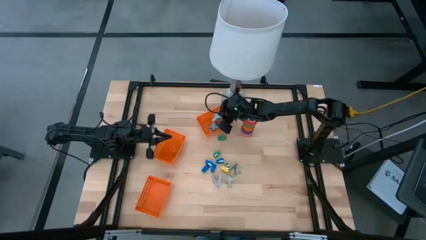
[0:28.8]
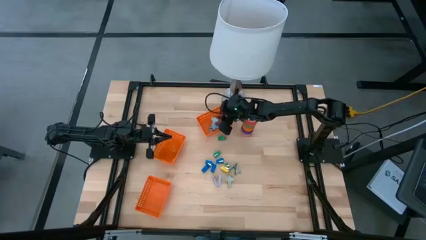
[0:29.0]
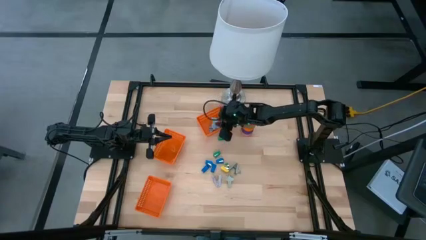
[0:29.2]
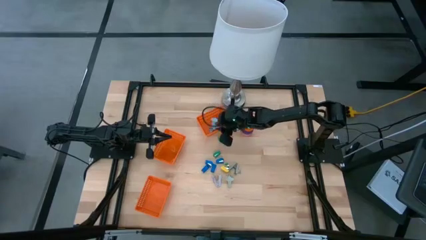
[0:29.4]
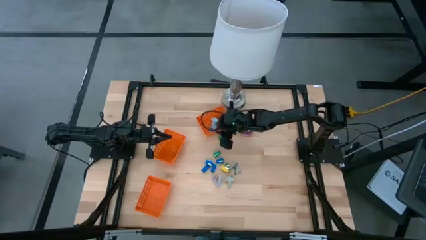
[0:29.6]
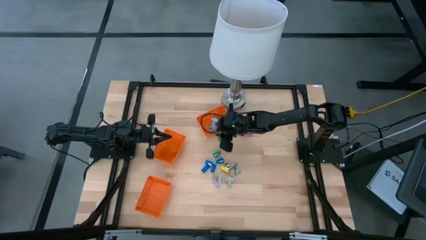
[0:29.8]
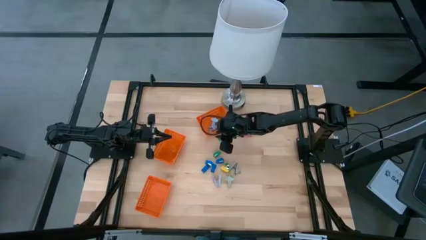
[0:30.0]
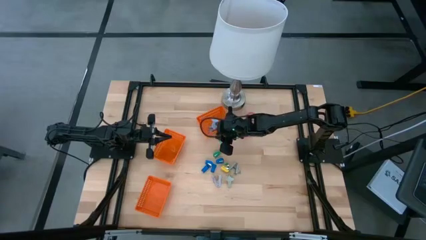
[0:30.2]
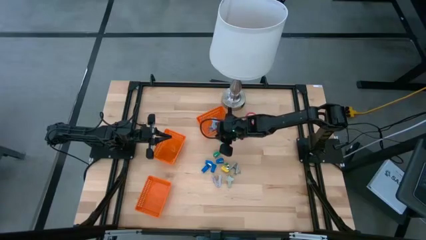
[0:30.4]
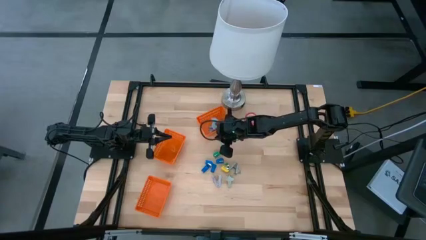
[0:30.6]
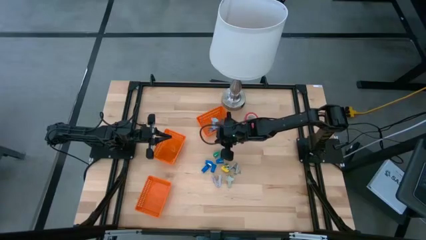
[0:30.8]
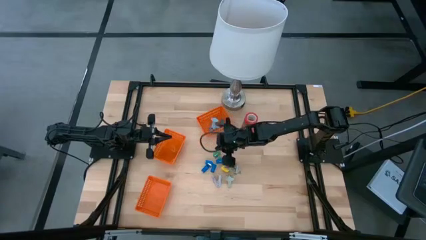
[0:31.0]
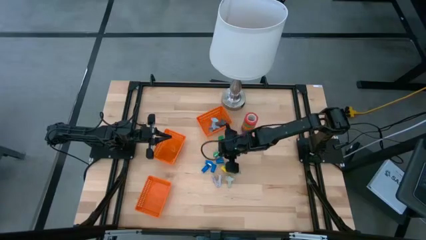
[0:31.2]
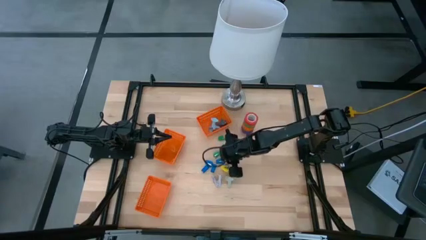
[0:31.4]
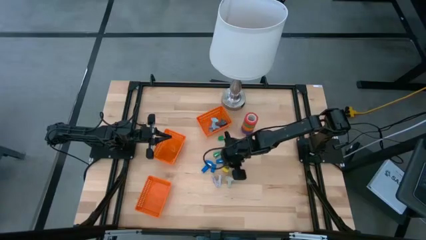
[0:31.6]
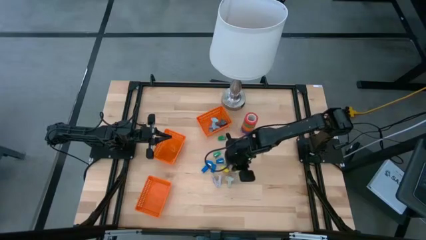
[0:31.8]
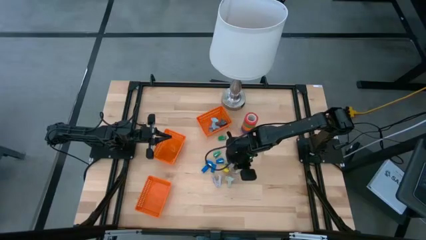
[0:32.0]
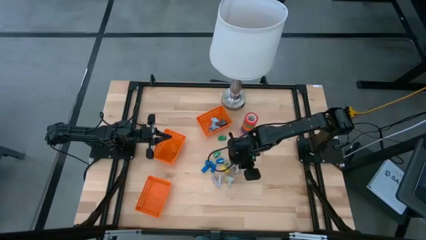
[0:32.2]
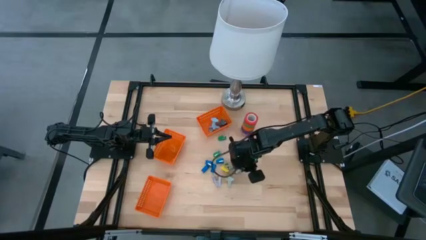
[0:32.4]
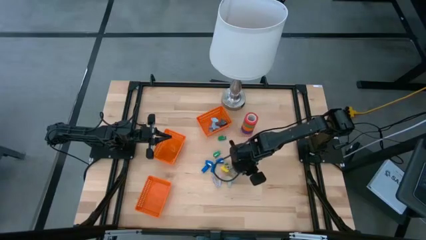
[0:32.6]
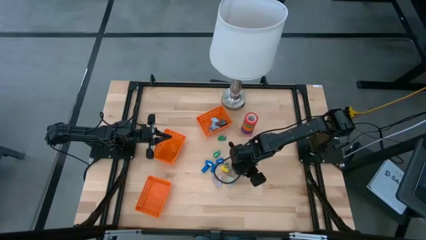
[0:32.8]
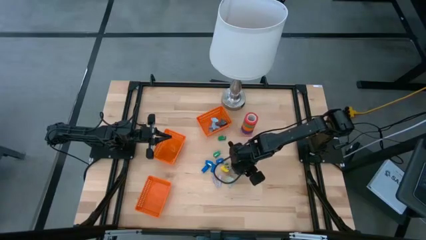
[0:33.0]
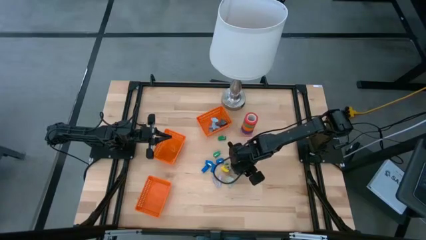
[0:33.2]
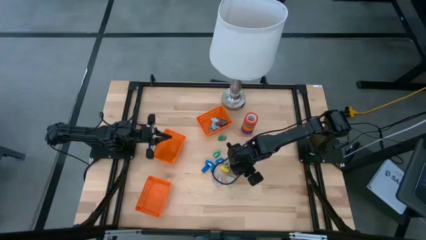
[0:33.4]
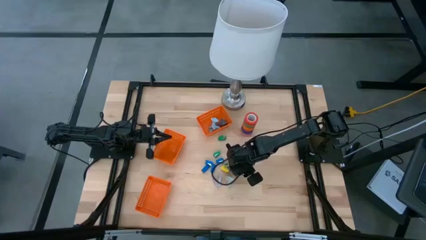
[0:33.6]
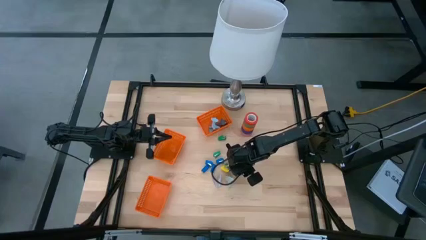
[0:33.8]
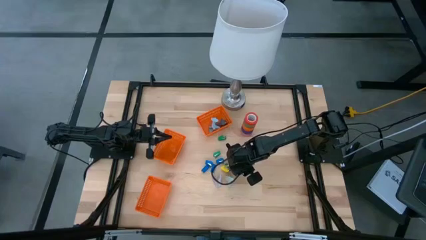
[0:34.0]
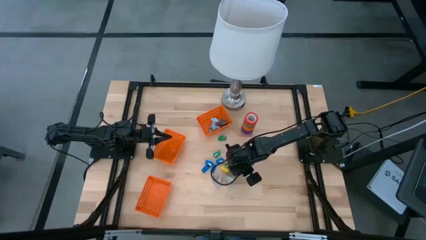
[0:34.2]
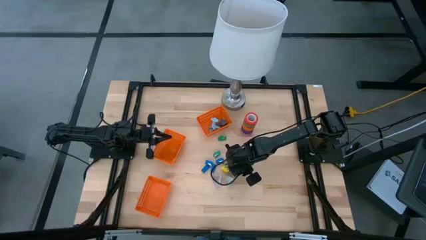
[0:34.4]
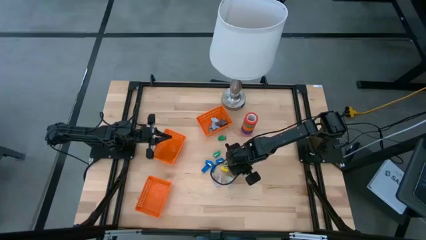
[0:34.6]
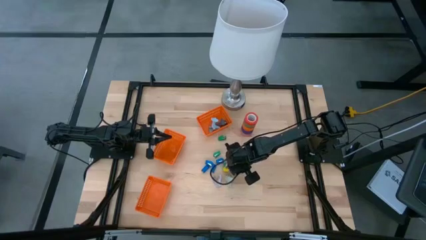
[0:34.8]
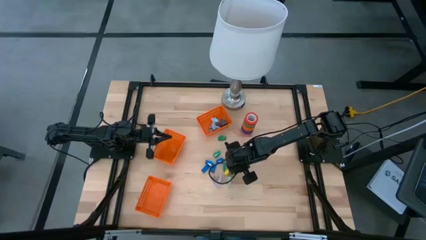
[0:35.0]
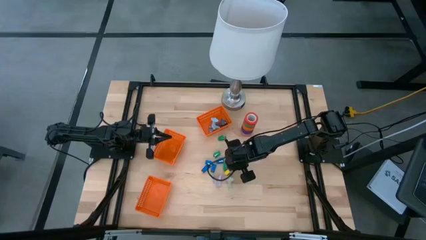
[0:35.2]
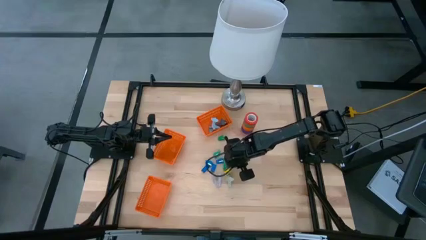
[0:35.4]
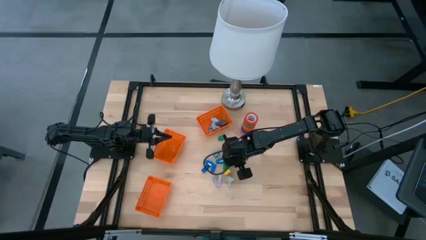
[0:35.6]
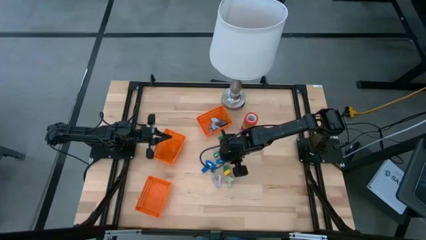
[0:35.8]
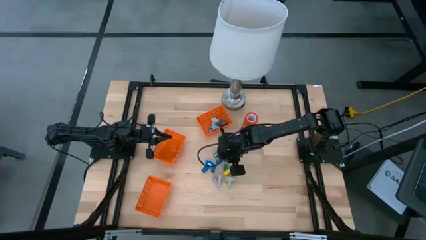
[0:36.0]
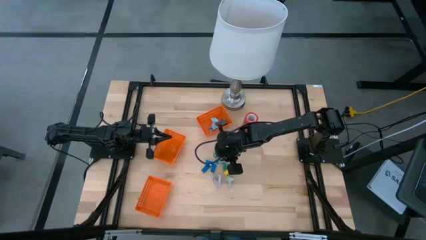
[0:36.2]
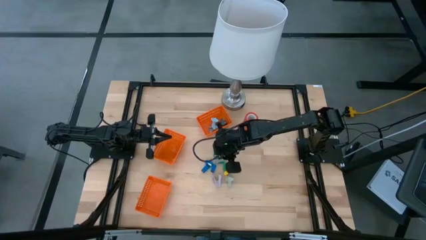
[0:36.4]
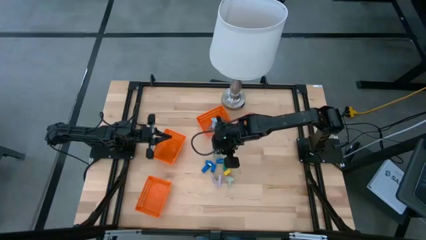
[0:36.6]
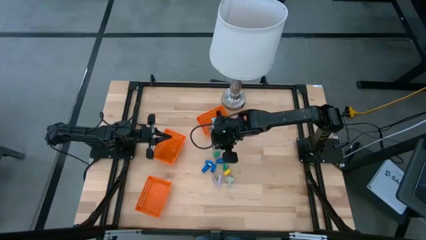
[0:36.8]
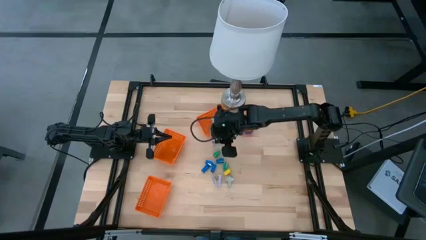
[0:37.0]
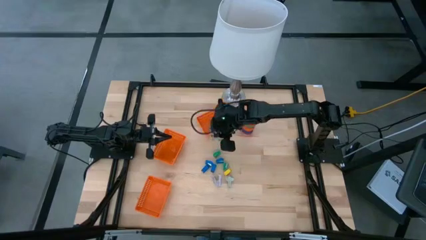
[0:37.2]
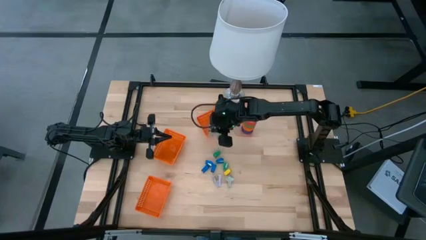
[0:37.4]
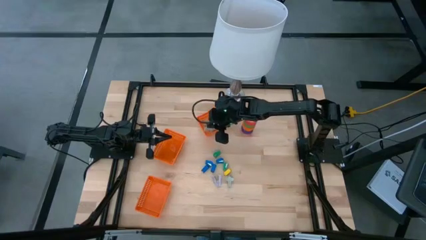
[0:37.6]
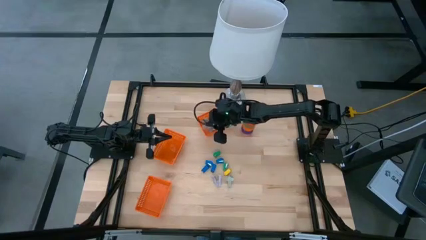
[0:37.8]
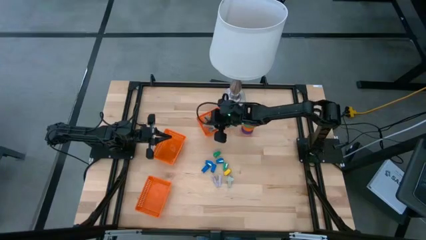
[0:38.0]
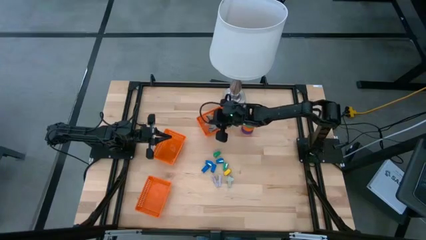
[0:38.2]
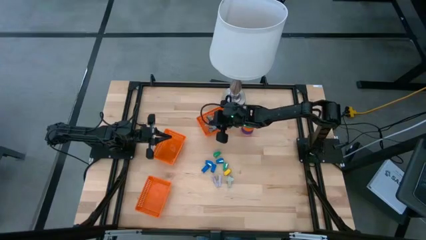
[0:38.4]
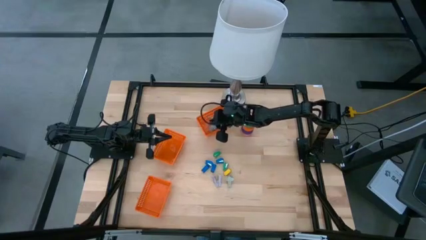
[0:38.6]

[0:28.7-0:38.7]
Task: Pick and place Stapler, Stapler remover, tape
Put the gray staple remover into the top orange bin

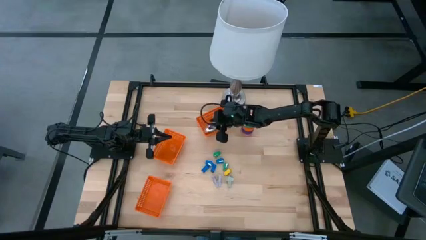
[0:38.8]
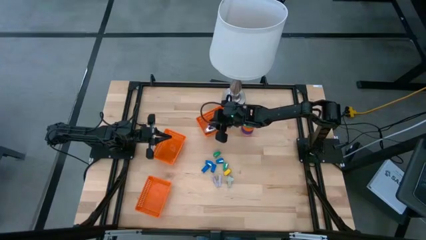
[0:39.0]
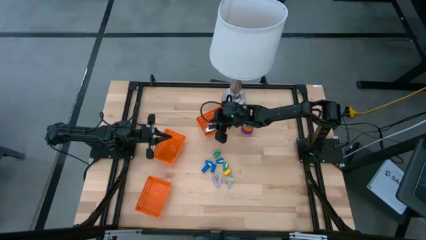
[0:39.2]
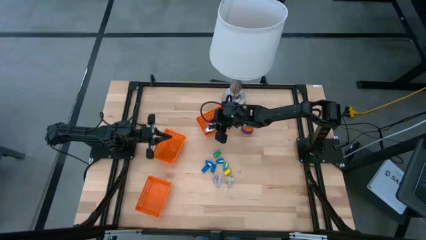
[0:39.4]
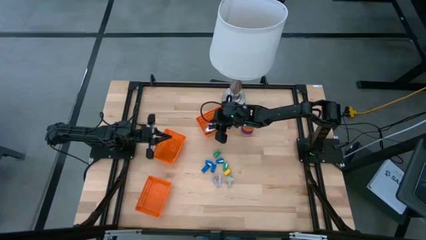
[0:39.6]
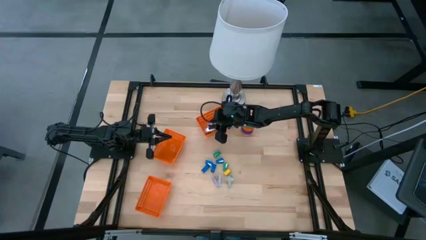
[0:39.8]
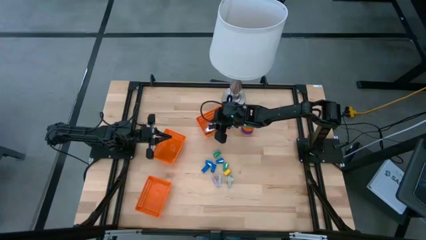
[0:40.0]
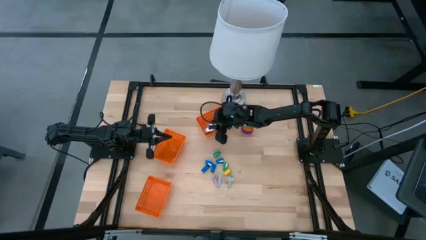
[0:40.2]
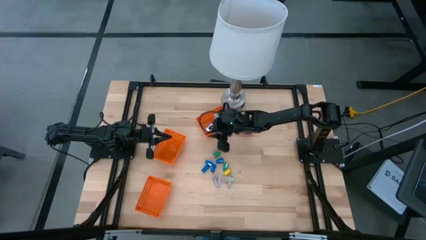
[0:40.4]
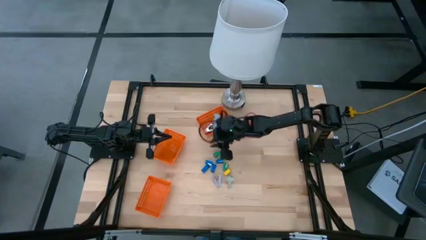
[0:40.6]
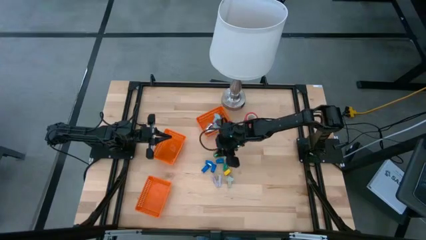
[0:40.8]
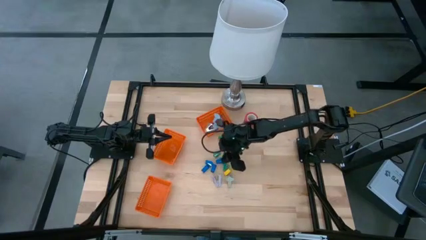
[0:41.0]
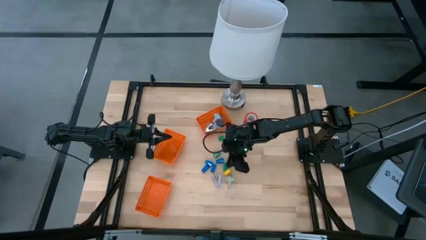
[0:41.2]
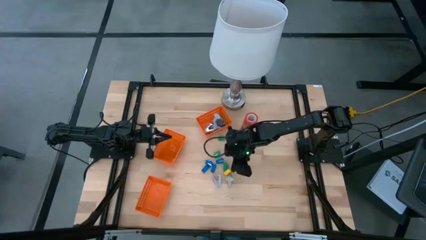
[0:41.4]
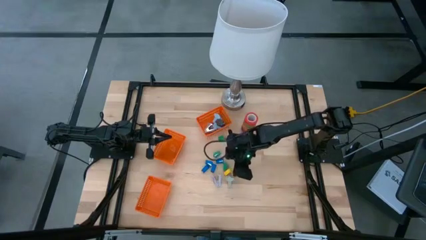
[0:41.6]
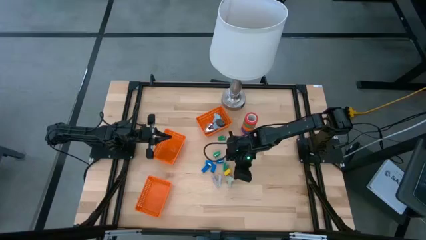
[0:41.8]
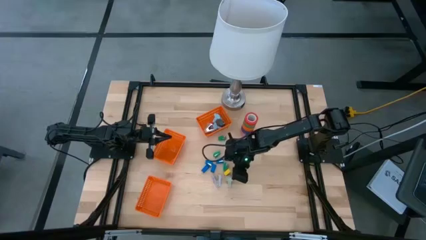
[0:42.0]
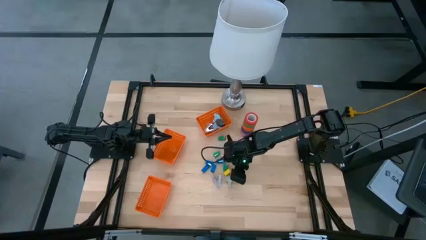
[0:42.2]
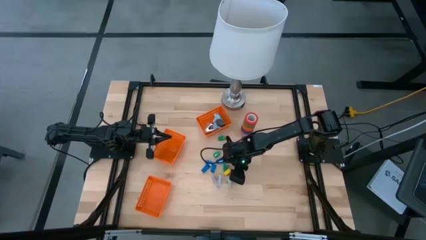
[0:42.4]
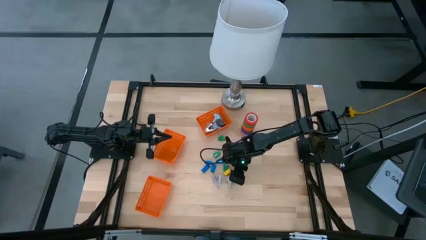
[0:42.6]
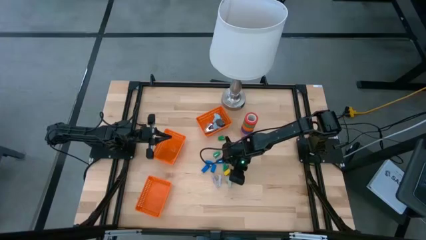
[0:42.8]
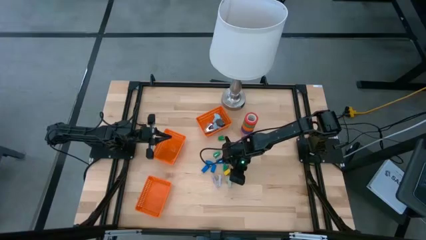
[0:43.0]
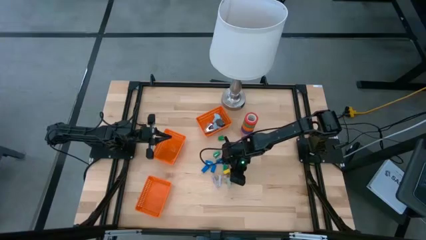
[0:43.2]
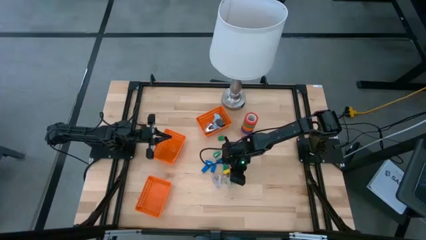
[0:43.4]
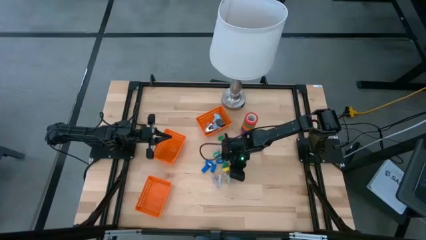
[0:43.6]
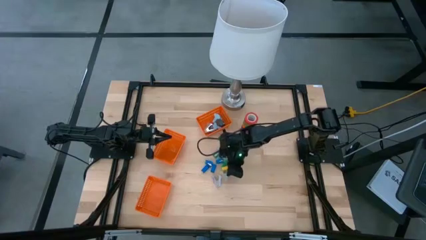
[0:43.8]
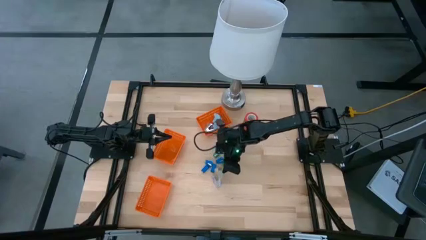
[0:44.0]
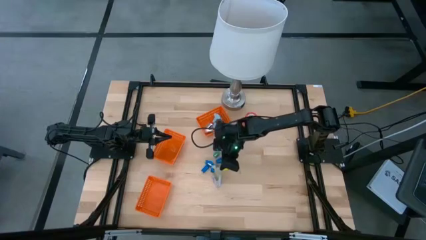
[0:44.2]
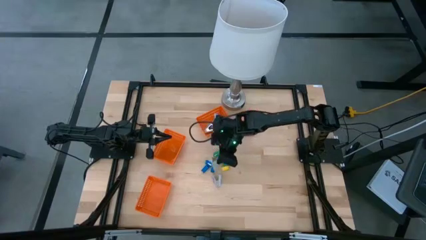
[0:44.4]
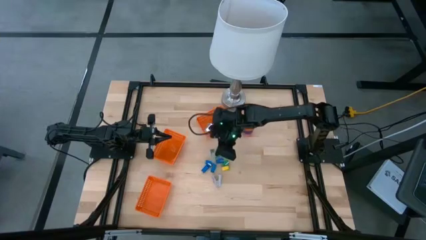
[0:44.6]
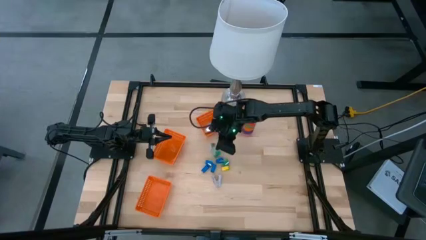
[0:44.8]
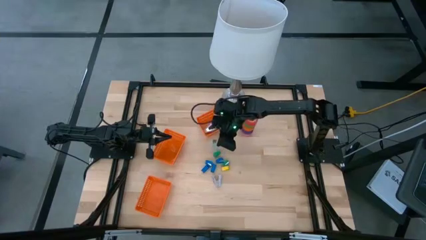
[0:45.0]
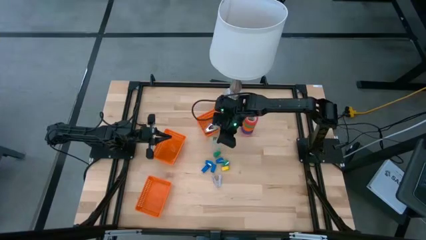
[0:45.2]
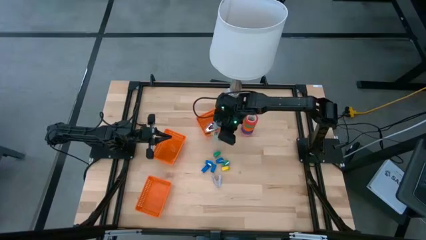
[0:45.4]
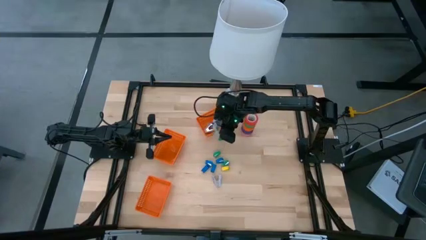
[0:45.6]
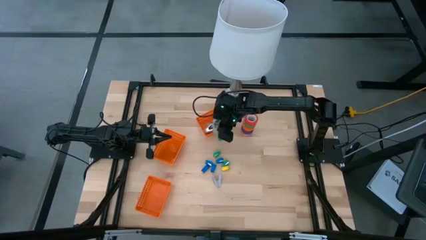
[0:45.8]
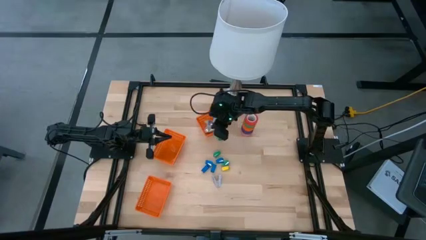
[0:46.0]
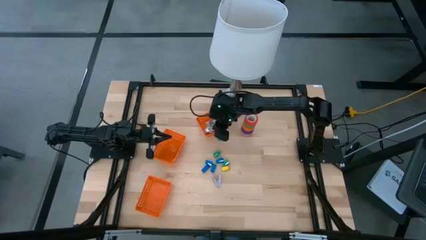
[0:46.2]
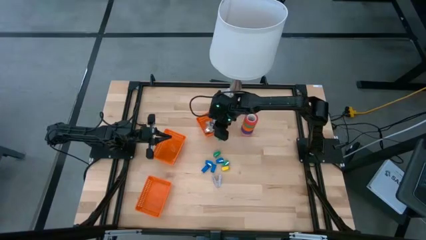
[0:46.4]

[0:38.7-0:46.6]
Put the gray staple remover into the top orange bin
